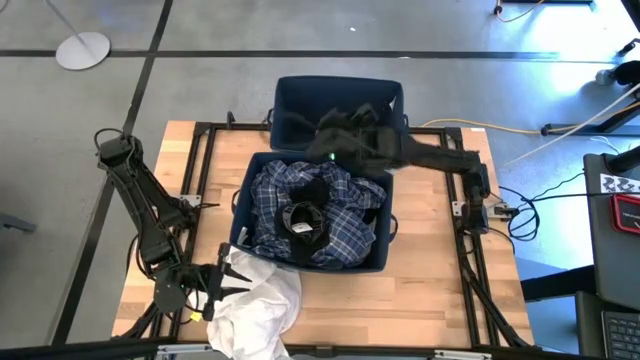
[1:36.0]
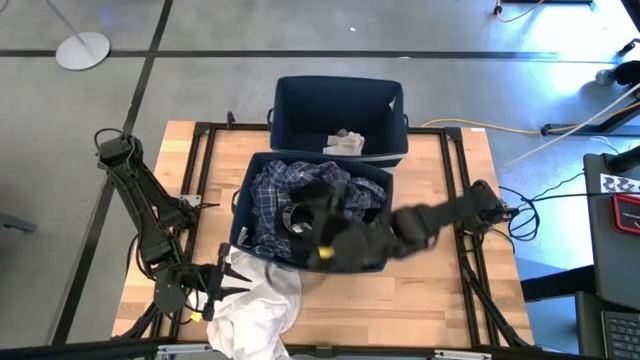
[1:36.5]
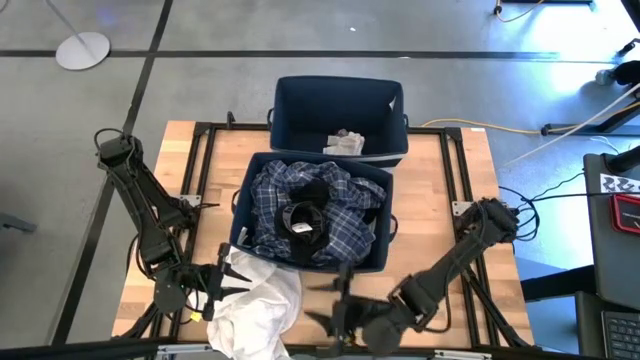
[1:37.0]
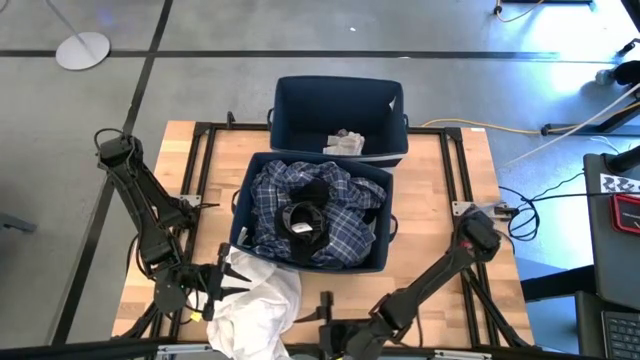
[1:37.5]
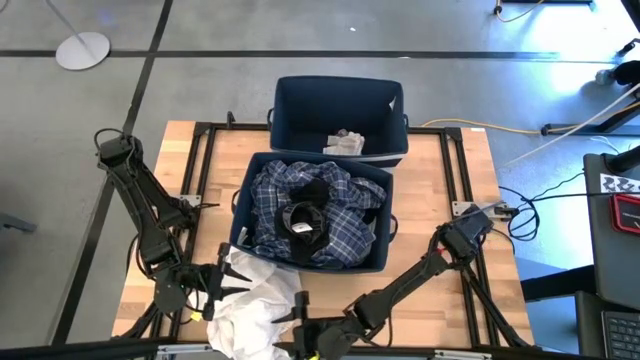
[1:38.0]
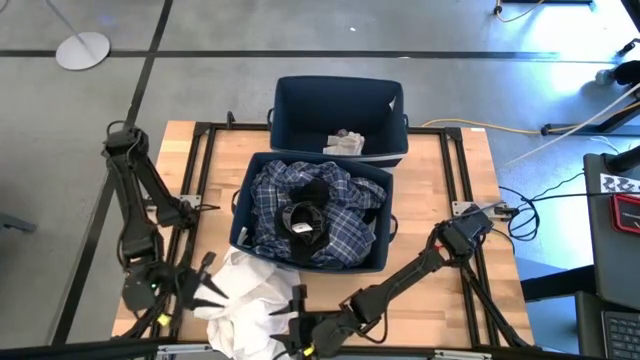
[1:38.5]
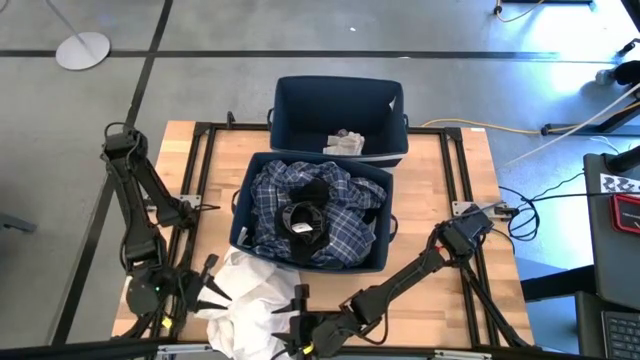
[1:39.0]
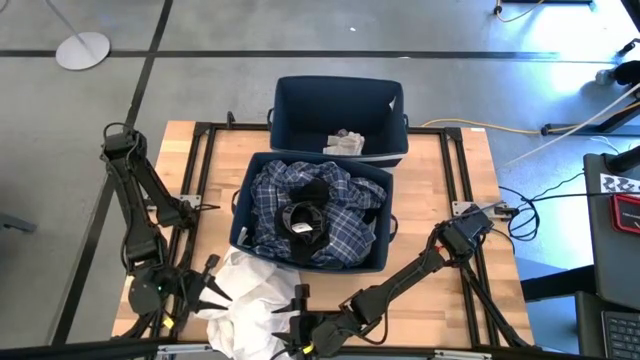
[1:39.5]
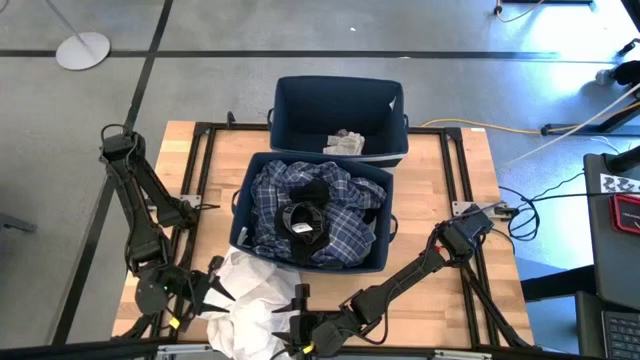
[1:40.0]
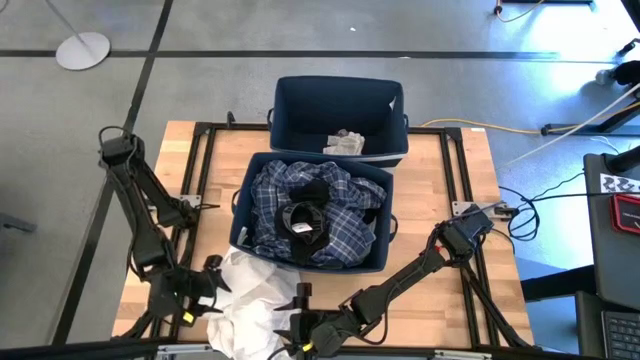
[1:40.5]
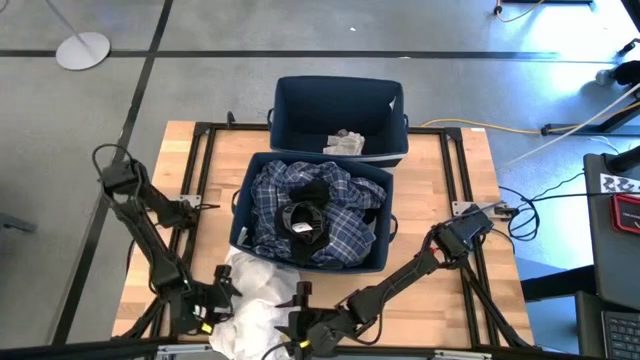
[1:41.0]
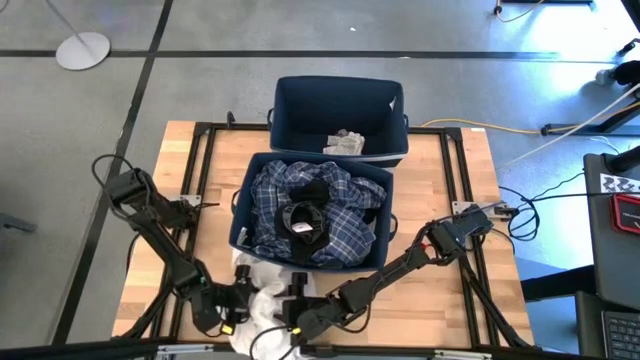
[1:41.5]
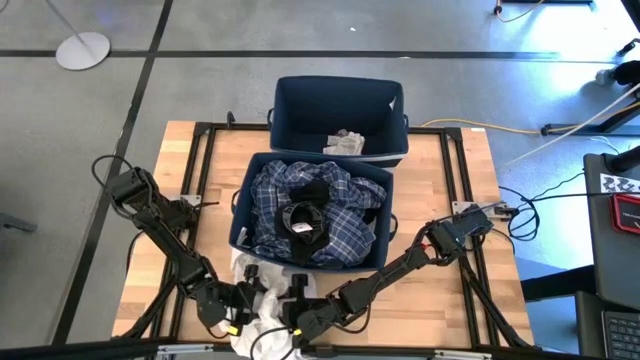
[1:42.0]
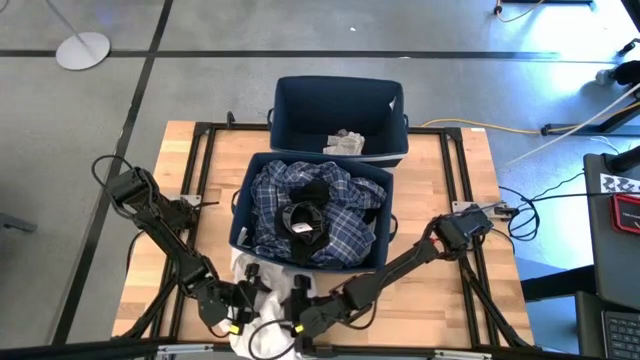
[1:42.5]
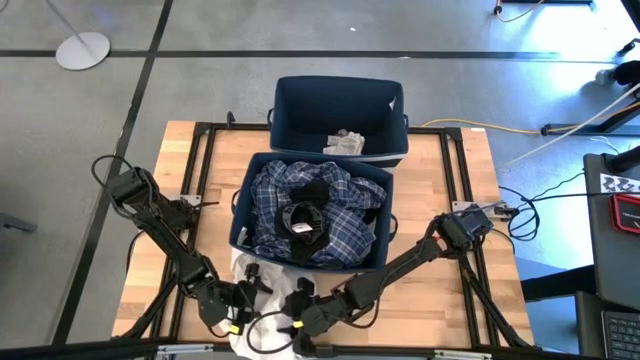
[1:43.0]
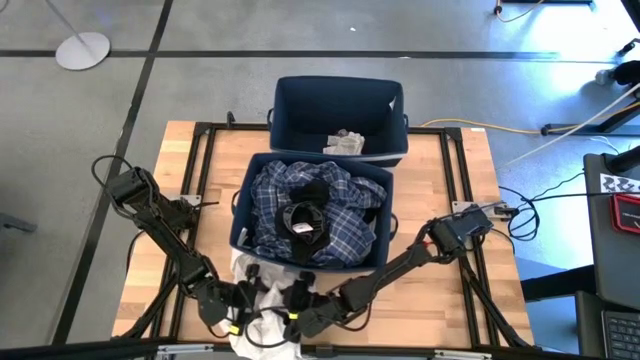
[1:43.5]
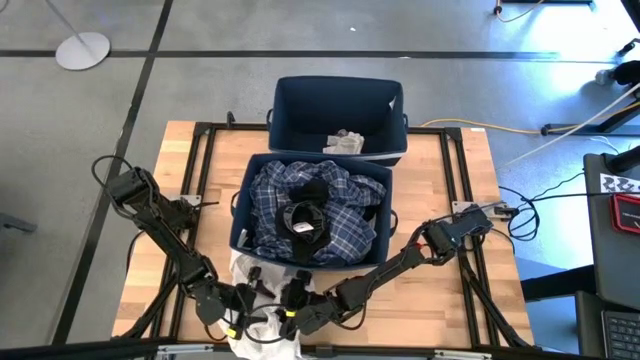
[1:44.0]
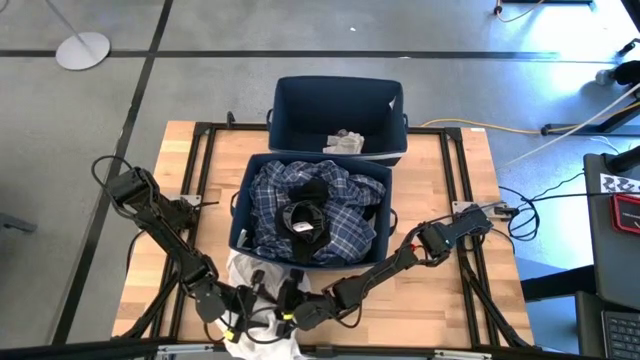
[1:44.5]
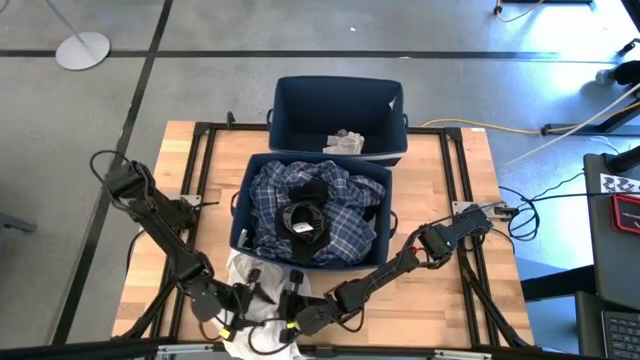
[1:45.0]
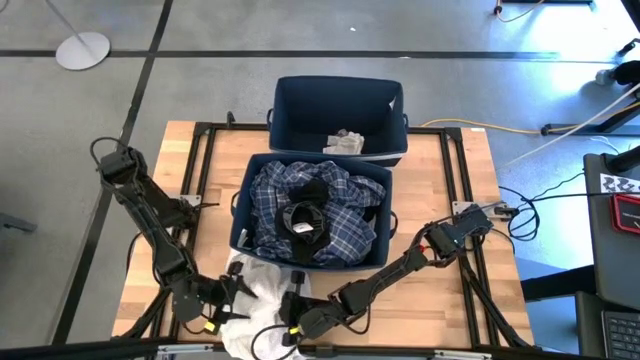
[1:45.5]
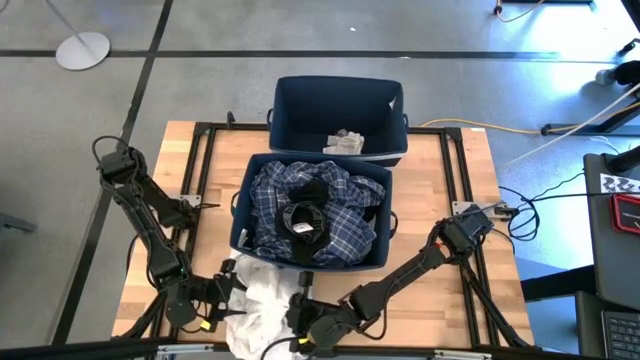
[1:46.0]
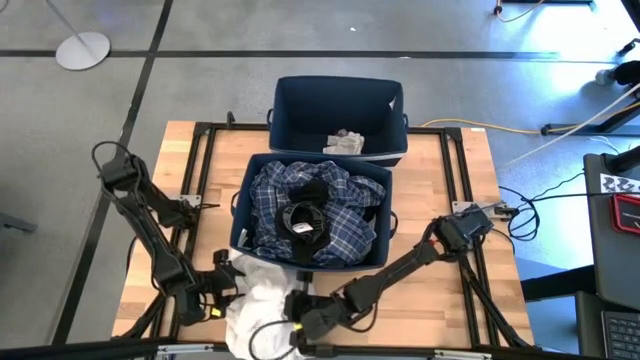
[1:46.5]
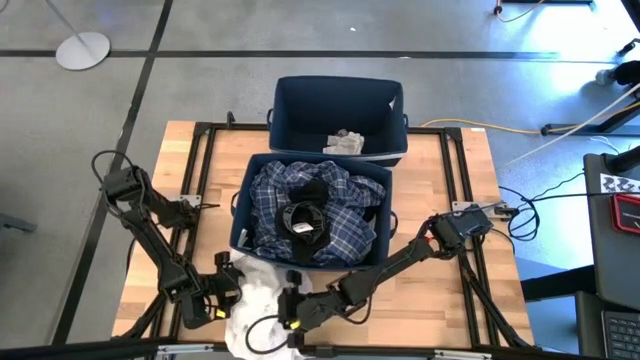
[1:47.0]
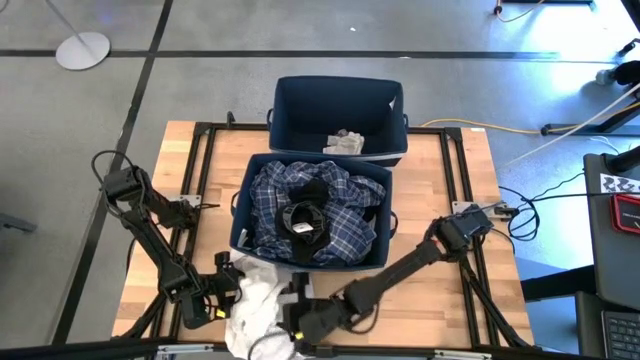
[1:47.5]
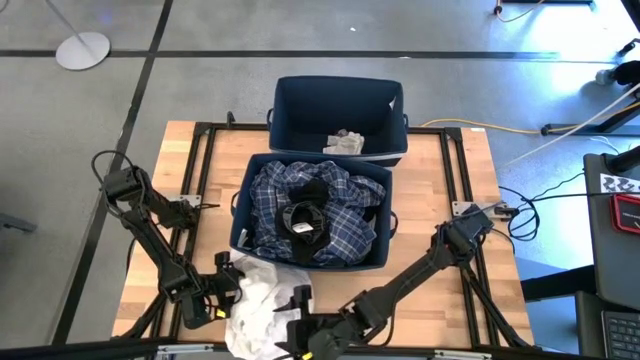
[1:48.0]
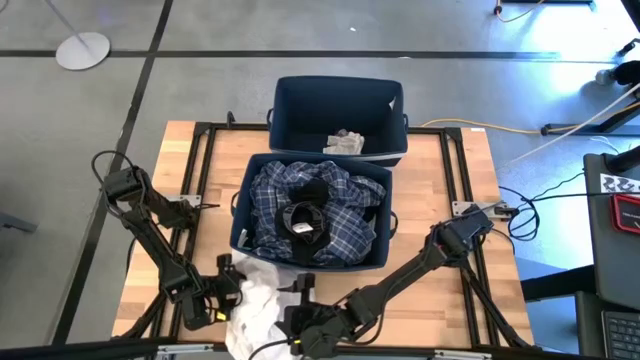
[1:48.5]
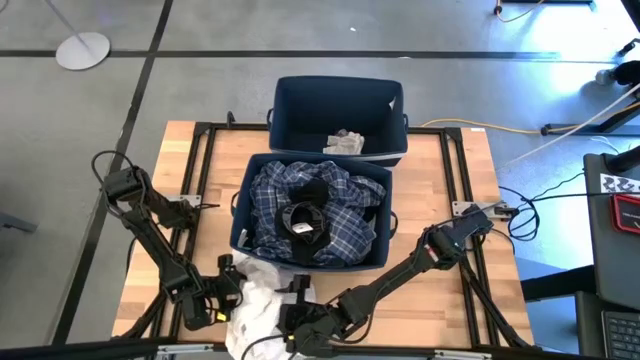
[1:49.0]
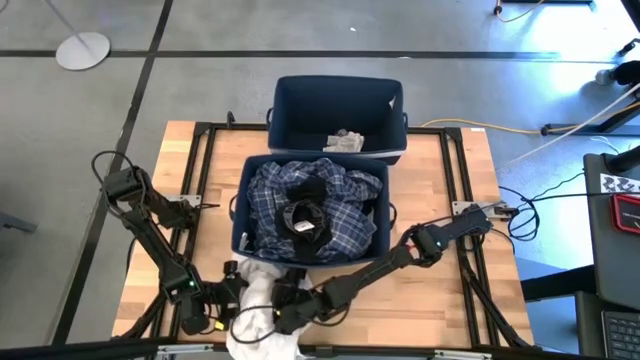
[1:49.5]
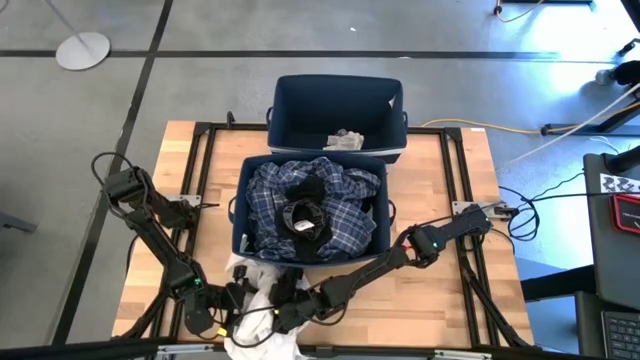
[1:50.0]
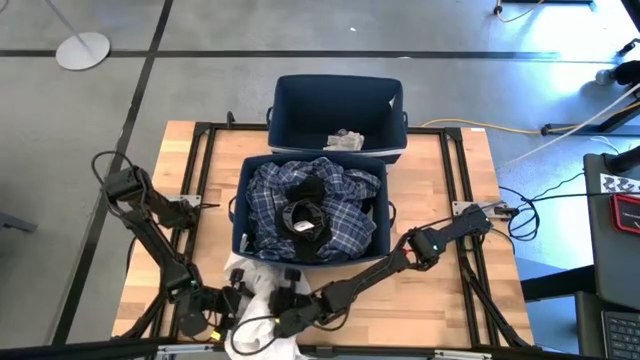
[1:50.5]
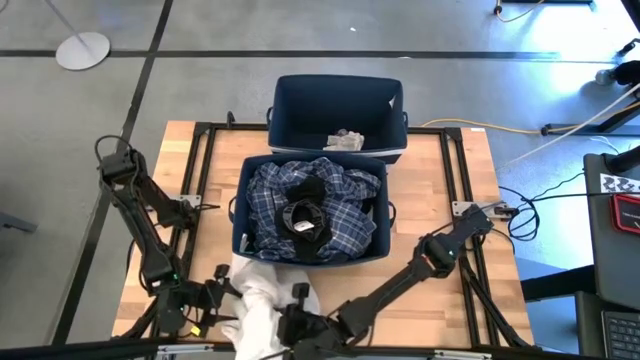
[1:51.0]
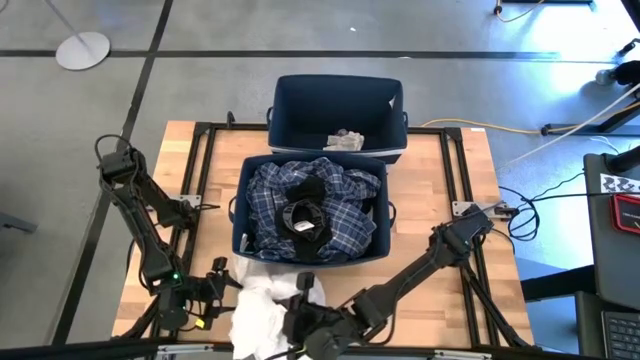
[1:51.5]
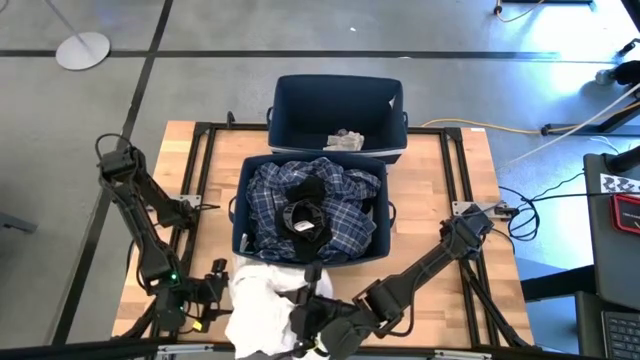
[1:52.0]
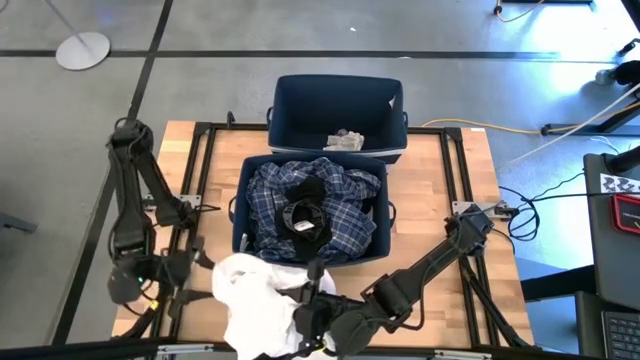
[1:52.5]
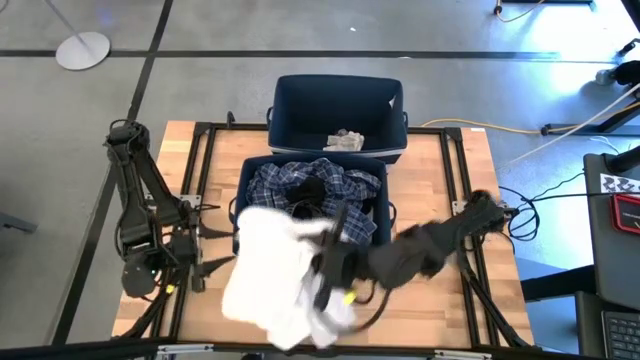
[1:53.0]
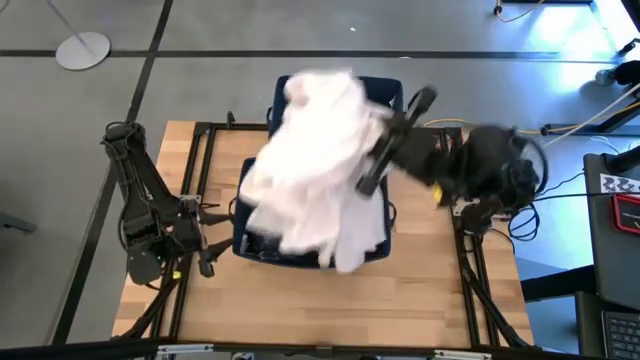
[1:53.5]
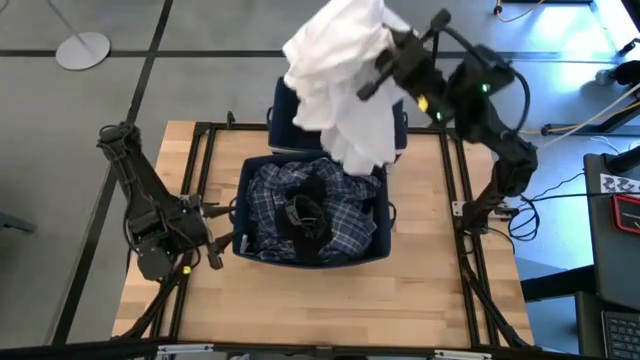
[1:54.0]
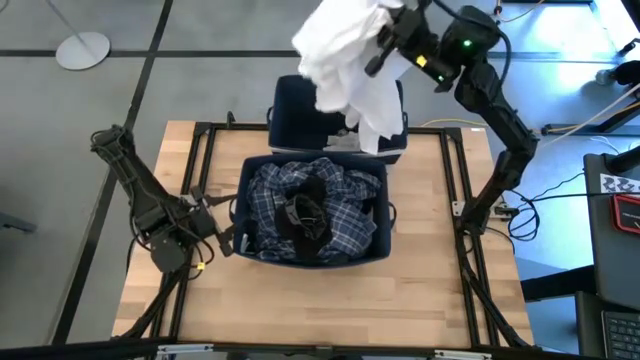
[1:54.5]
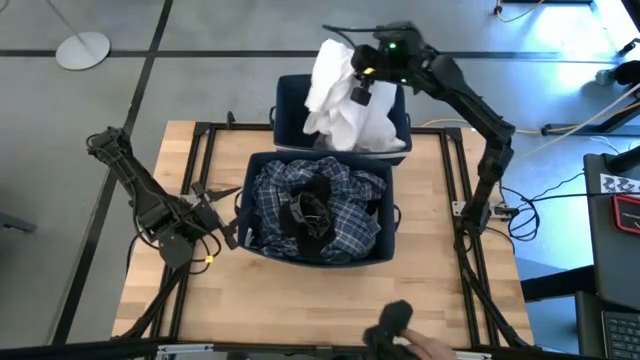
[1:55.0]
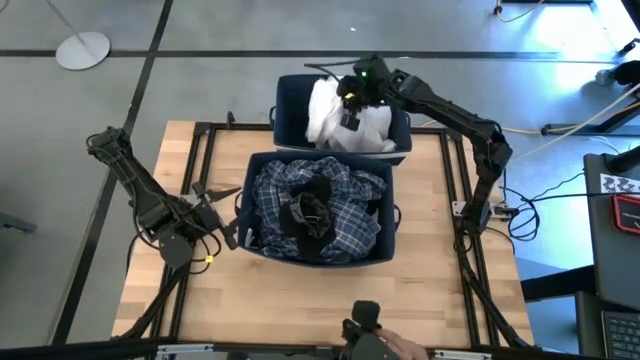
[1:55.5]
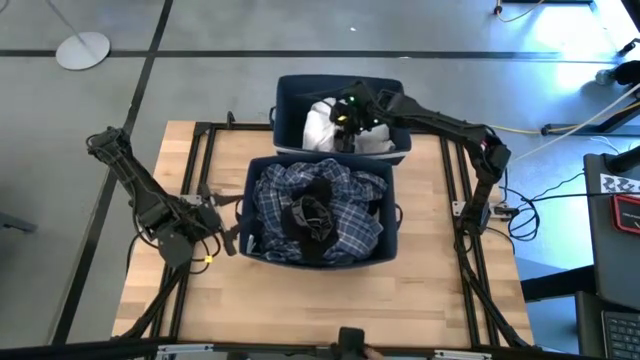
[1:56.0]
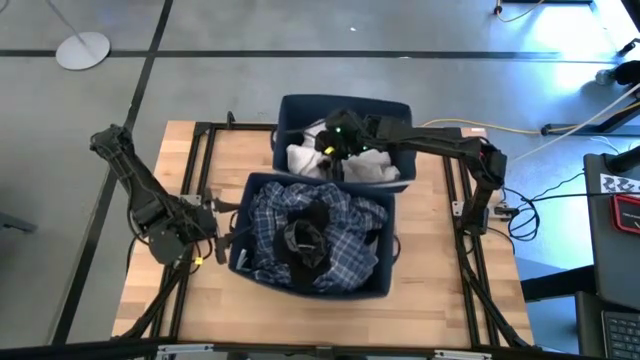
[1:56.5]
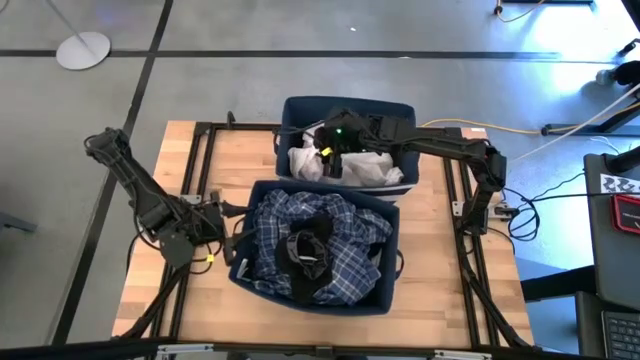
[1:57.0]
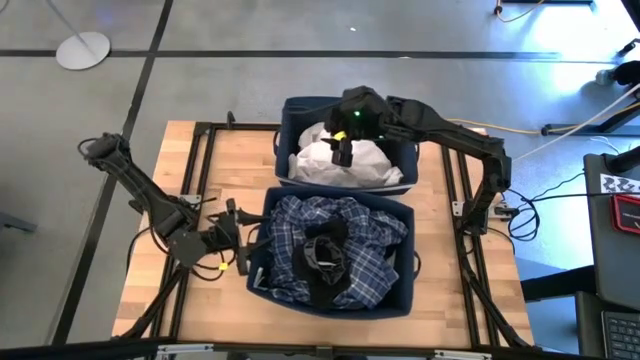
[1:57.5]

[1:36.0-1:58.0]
Task: Sort clothes
Put the white polo shirt into the top blue laundry bin
